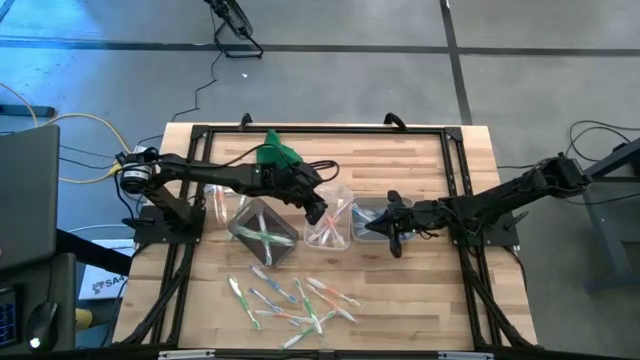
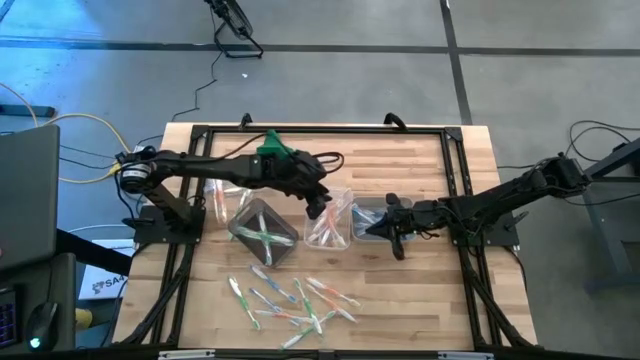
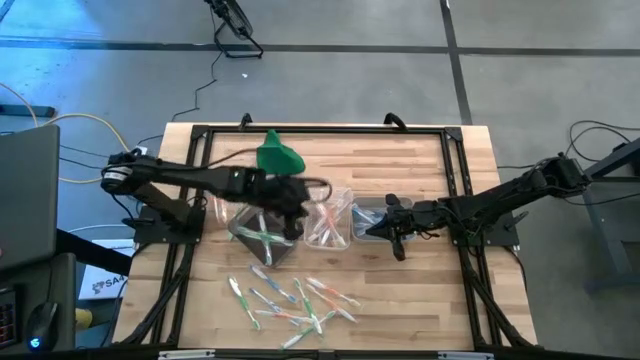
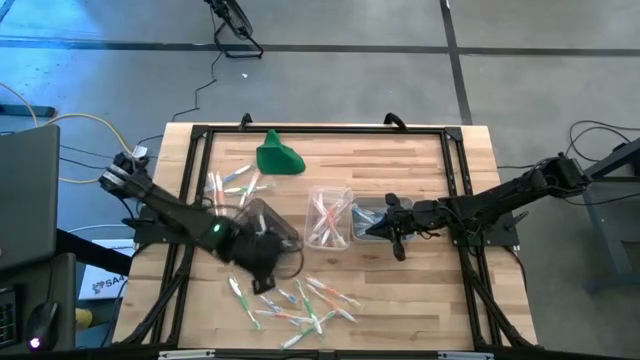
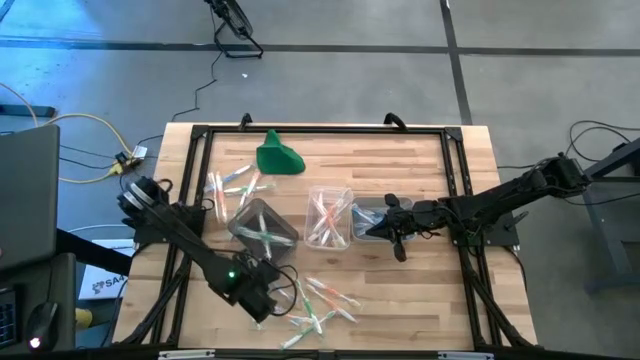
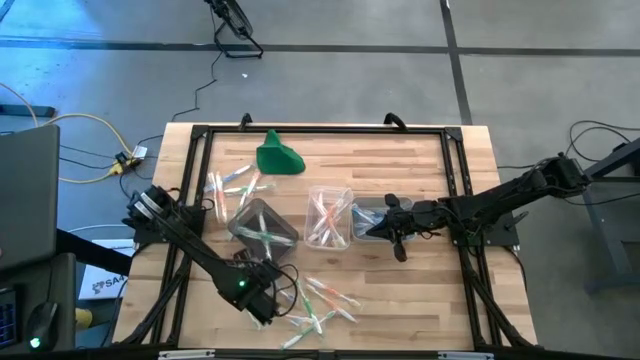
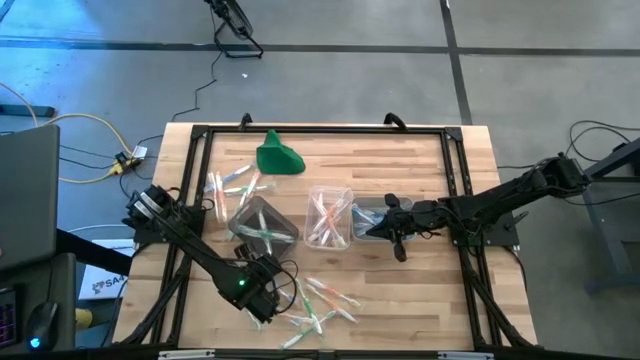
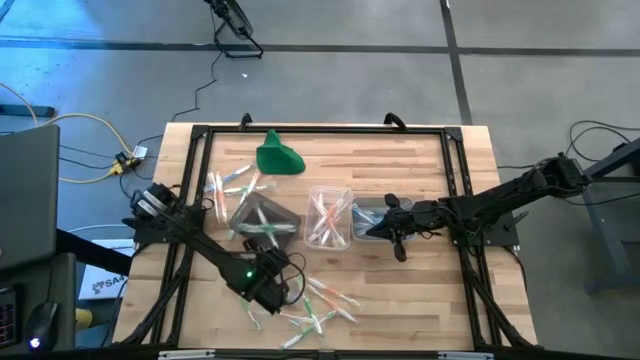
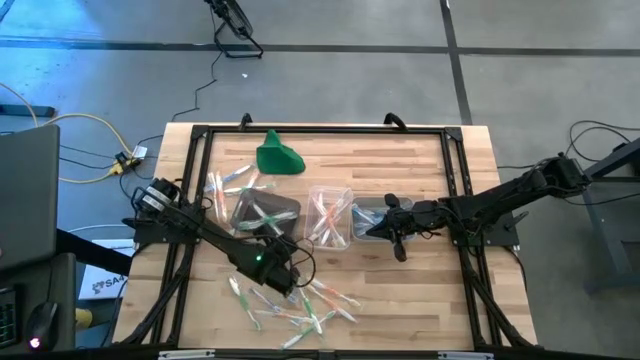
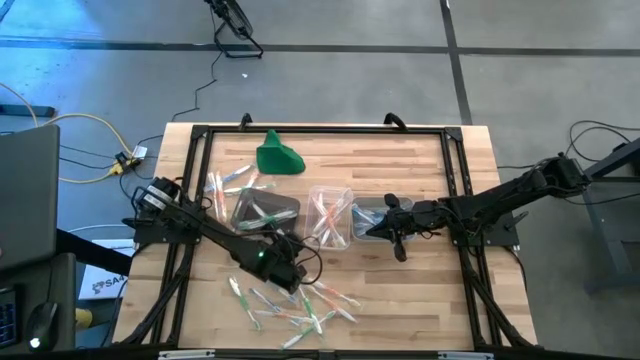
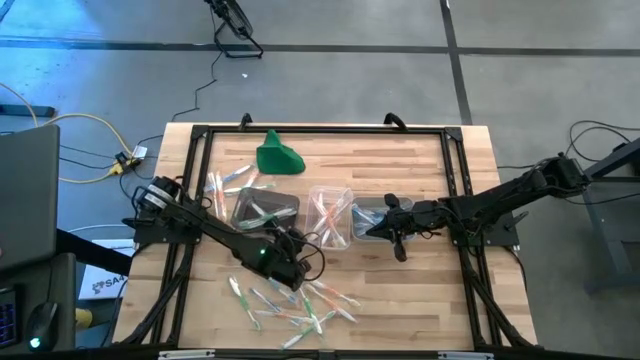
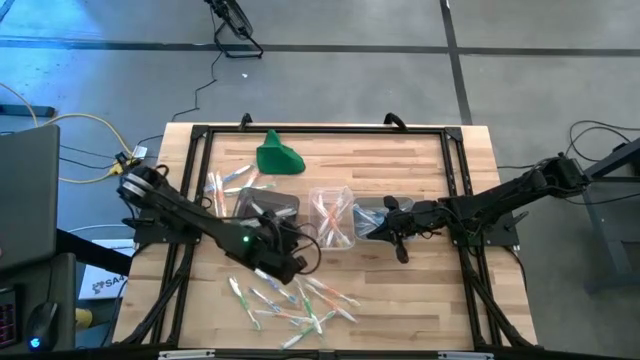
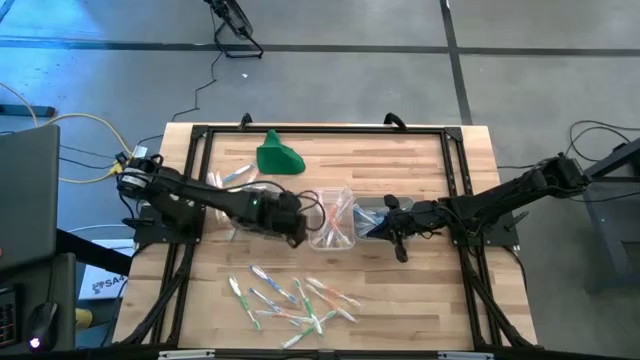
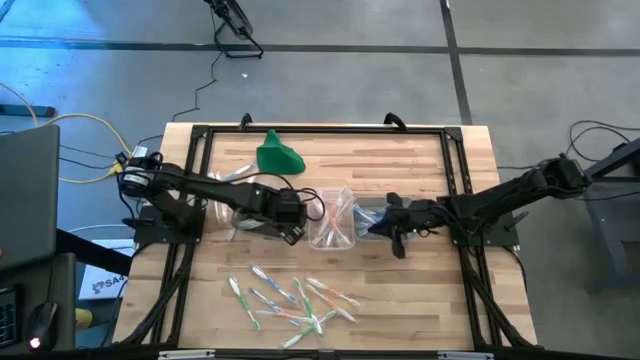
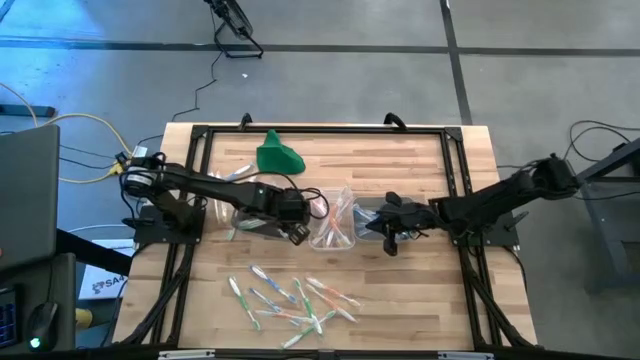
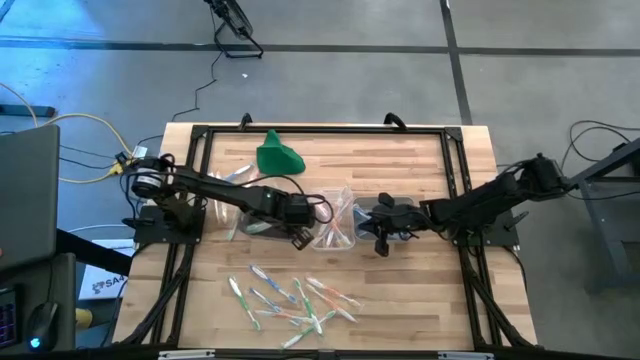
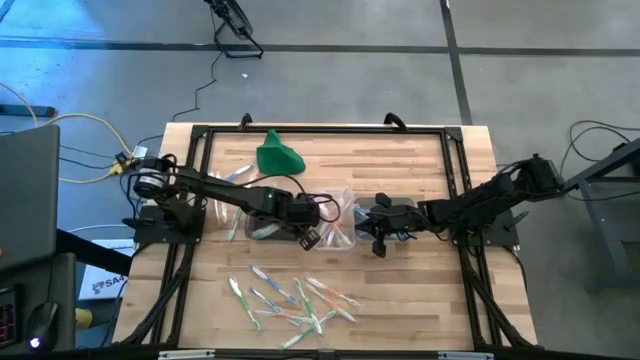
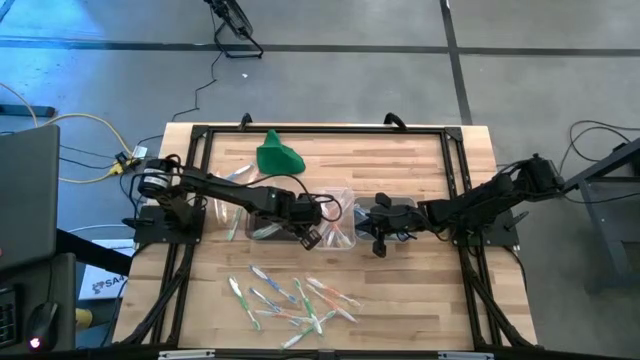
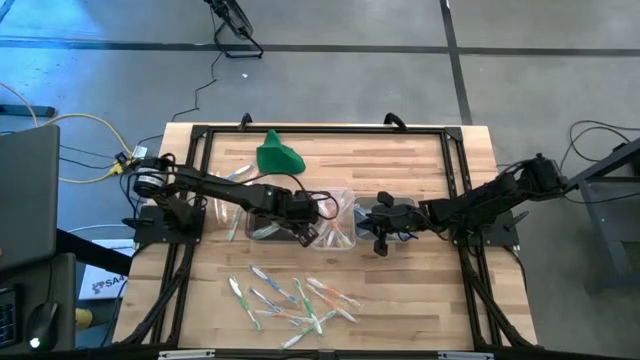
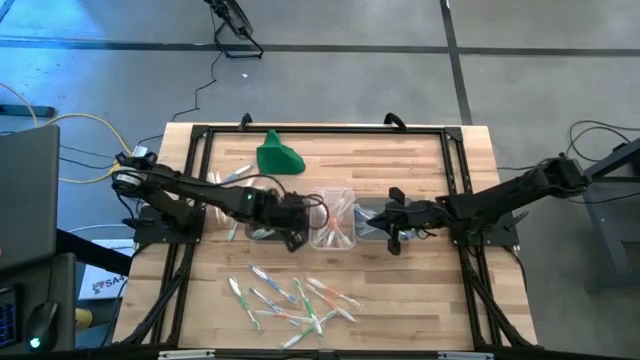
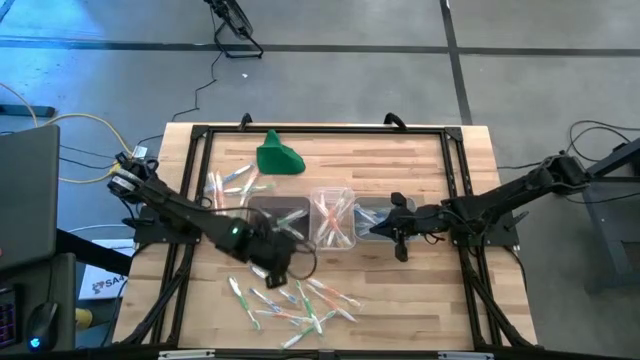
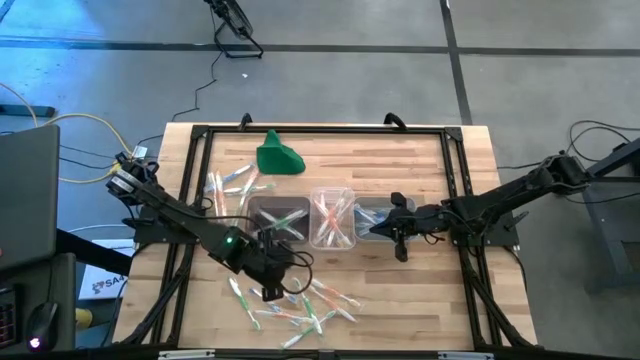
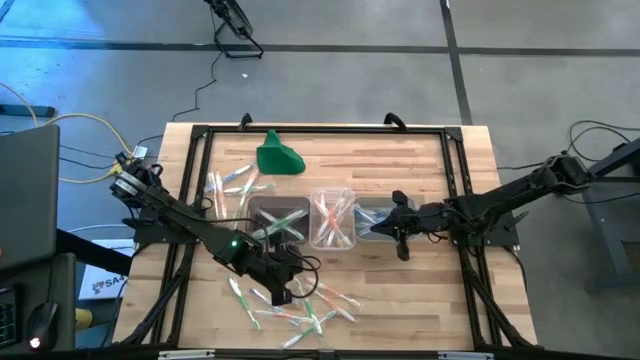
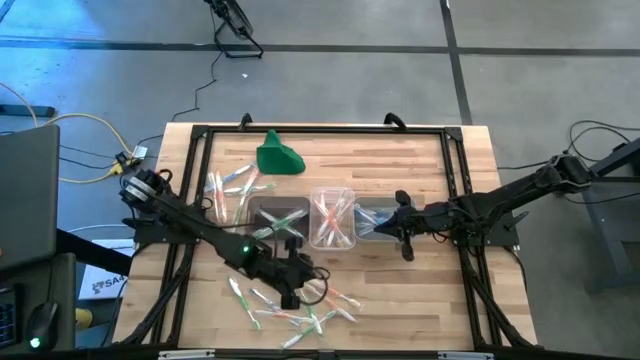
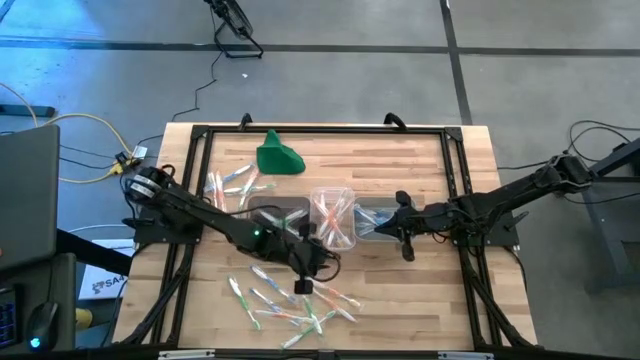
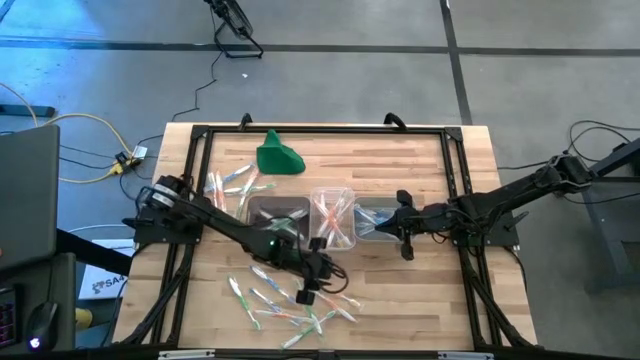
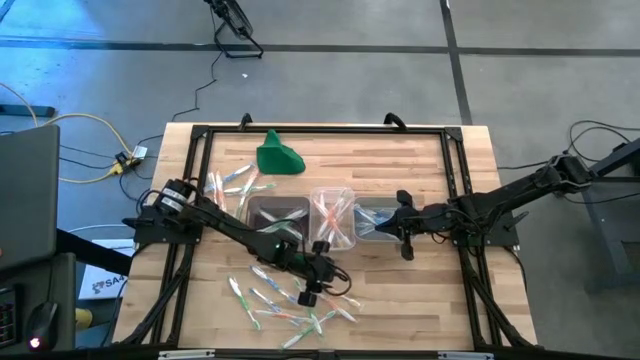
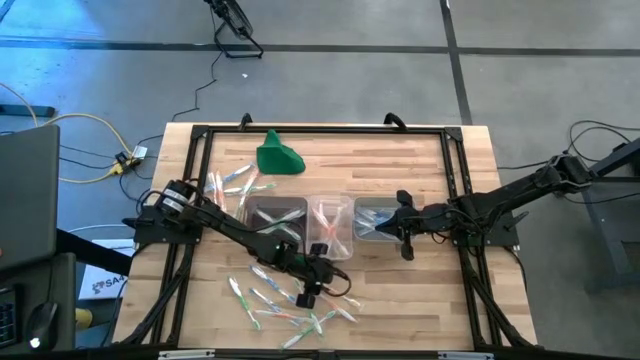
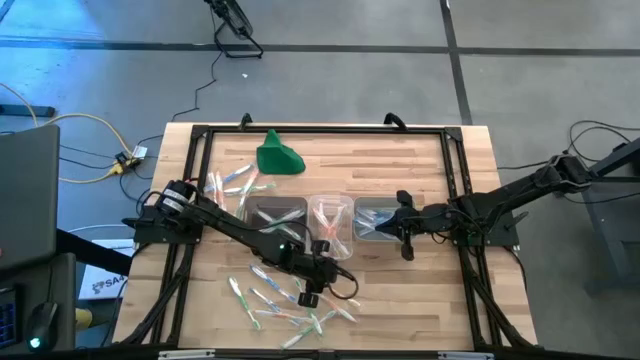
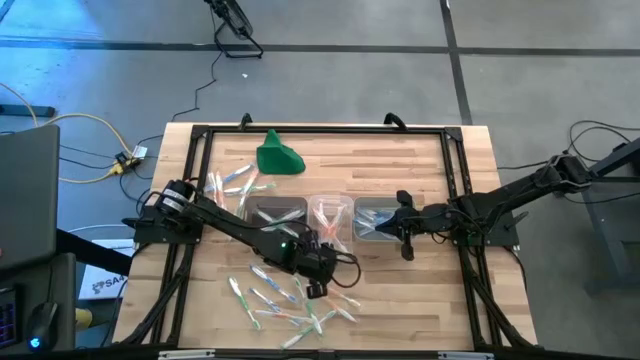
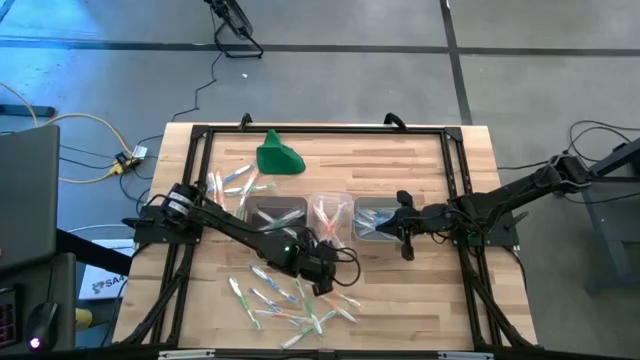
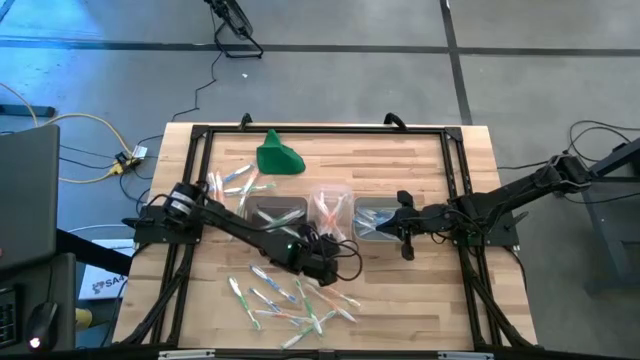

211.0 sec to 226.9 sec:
Task: Pick & Place Toothbrushes
Adjust the bins on the table

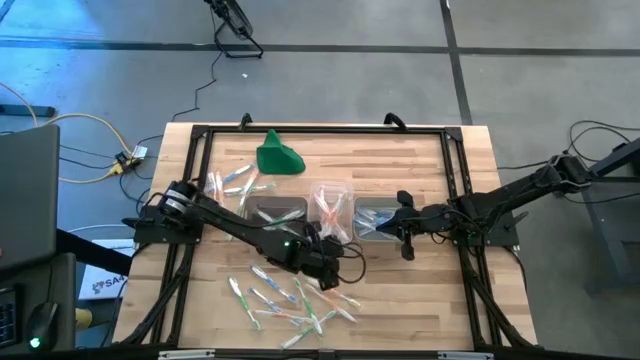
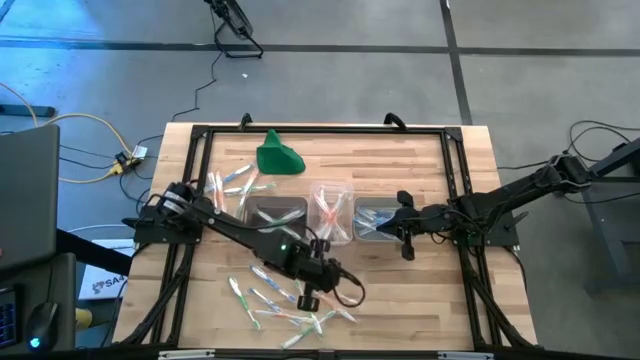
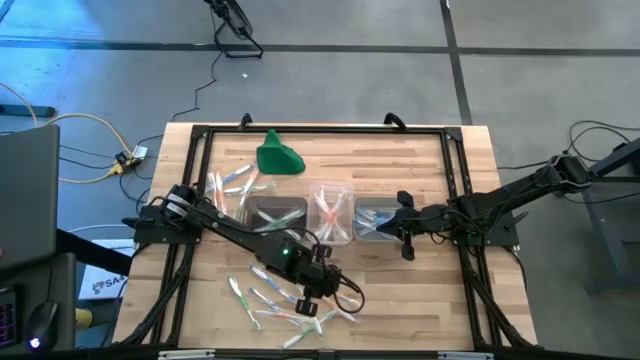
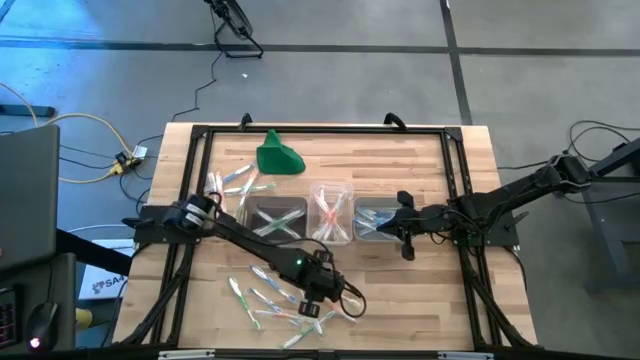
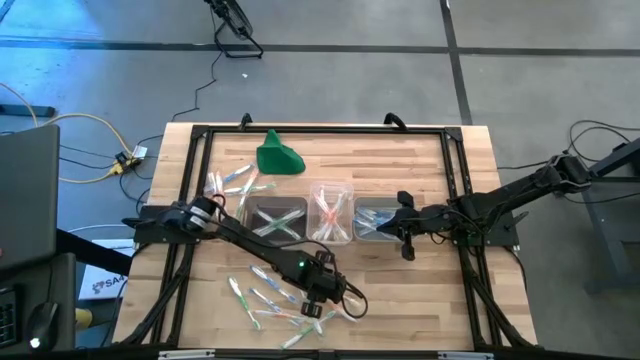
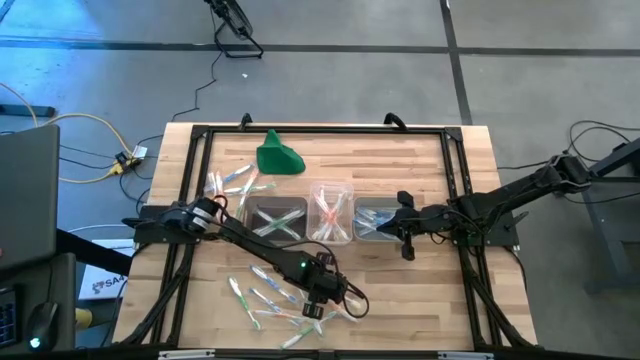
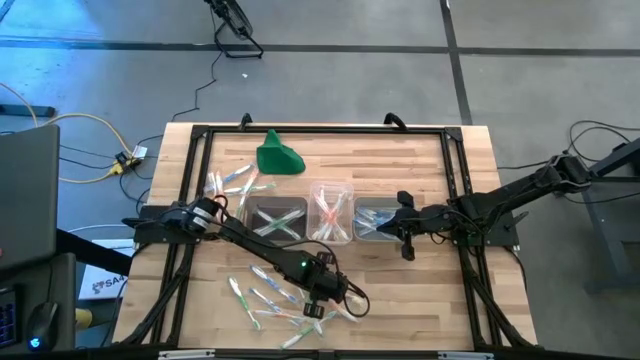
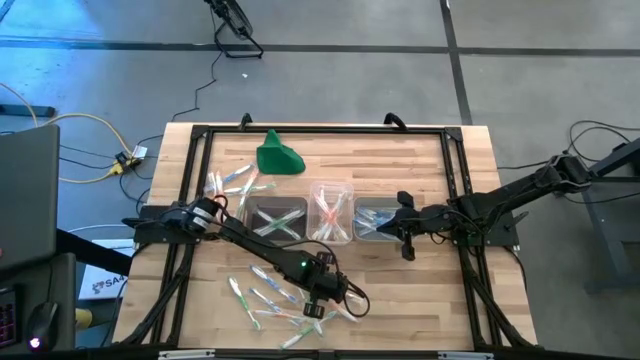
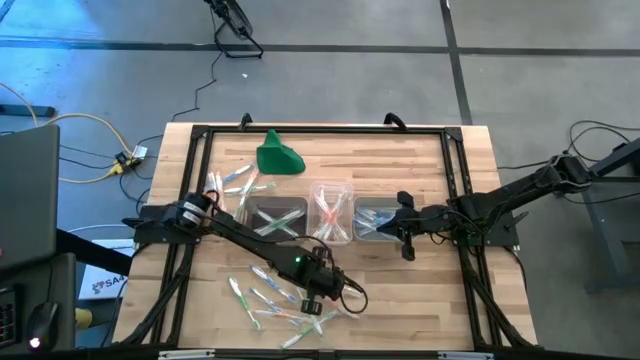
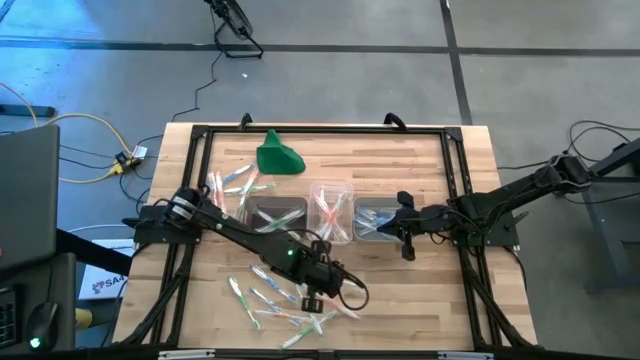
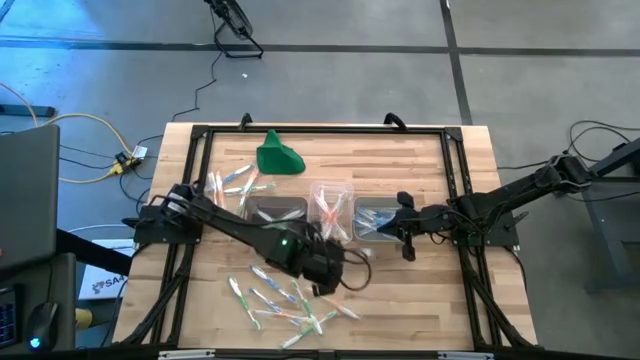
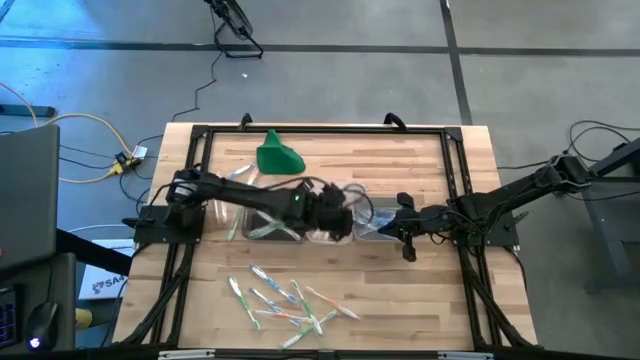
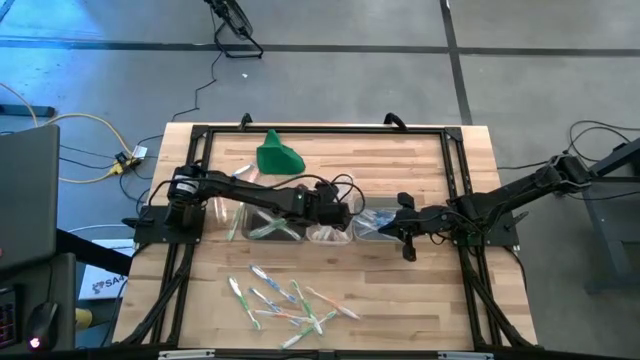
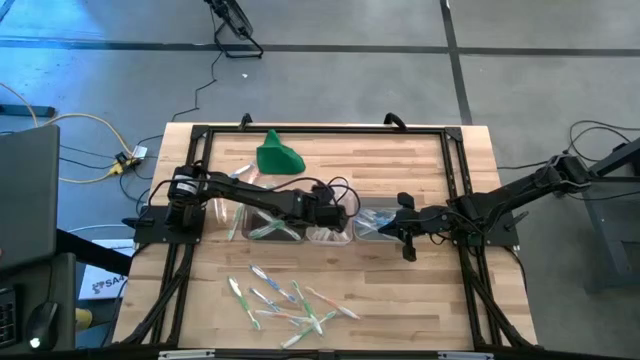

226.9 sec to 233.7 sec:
Put the orange toothbrush into the transparent bin
